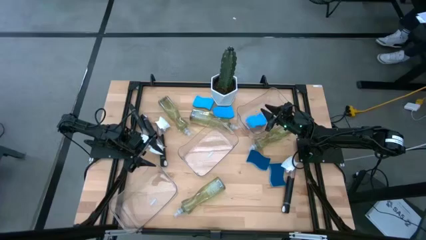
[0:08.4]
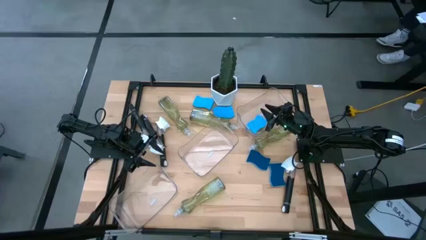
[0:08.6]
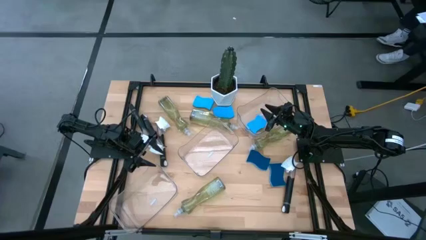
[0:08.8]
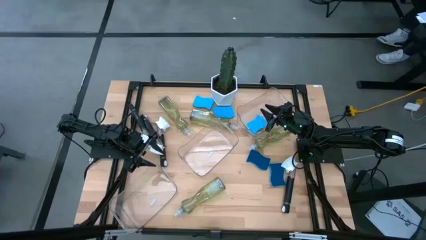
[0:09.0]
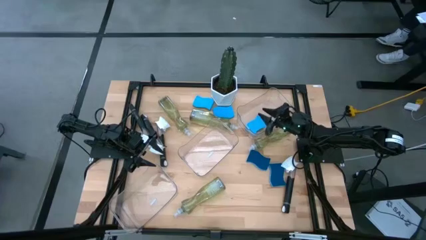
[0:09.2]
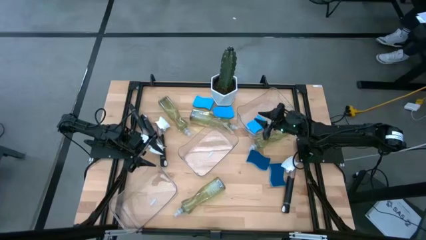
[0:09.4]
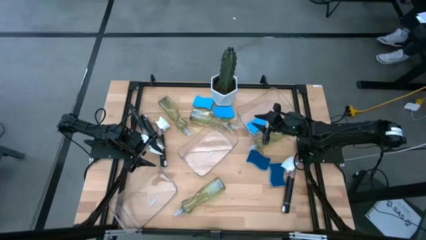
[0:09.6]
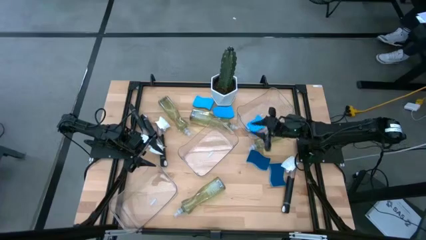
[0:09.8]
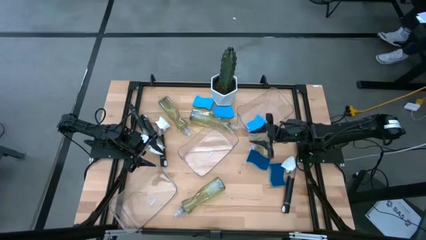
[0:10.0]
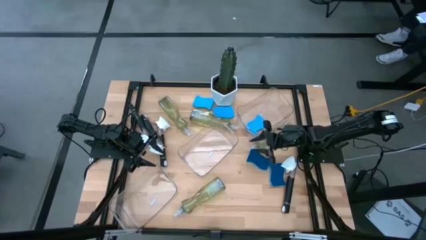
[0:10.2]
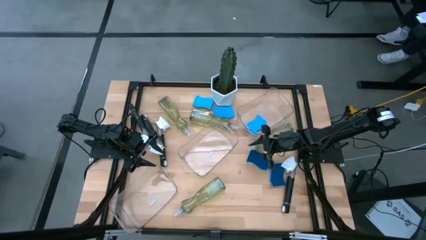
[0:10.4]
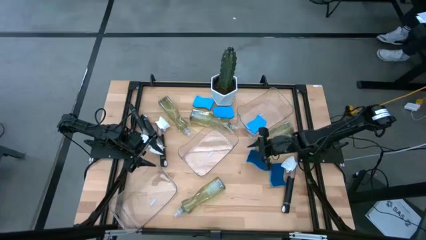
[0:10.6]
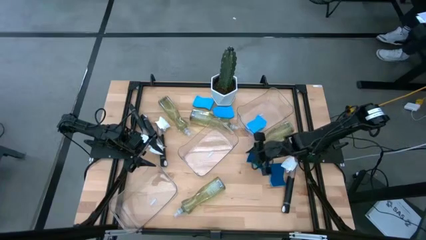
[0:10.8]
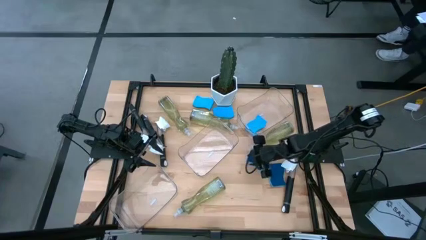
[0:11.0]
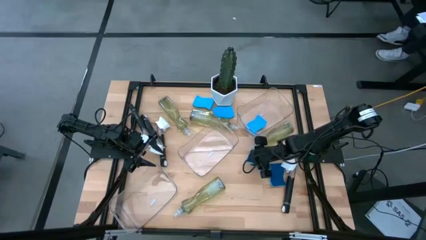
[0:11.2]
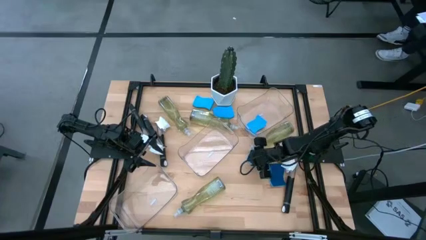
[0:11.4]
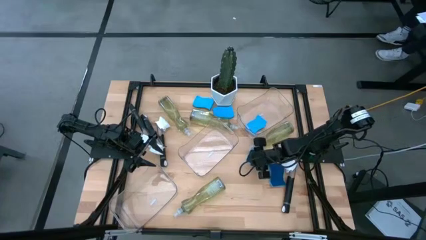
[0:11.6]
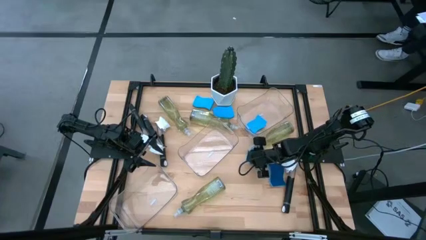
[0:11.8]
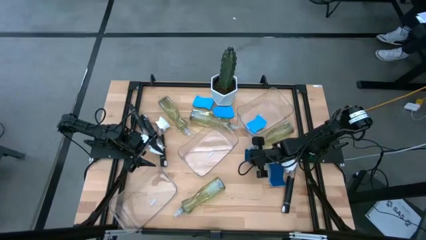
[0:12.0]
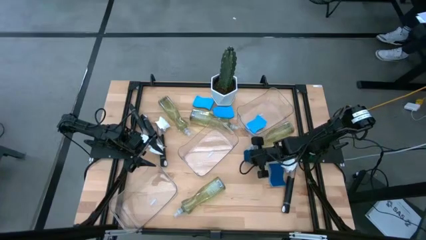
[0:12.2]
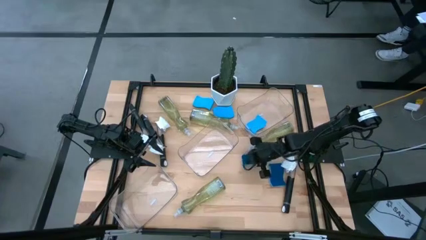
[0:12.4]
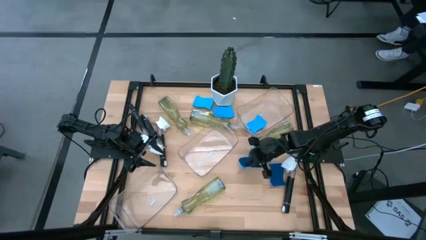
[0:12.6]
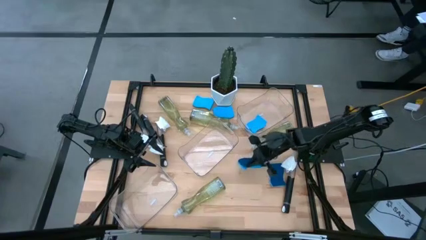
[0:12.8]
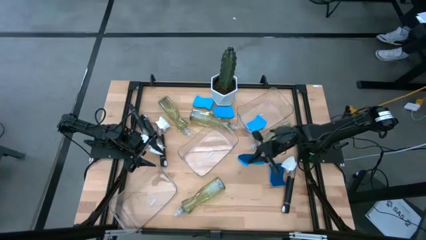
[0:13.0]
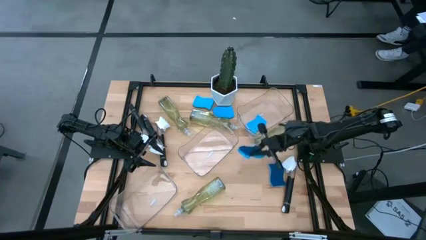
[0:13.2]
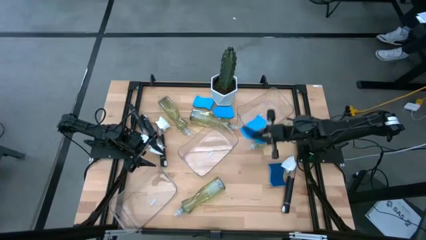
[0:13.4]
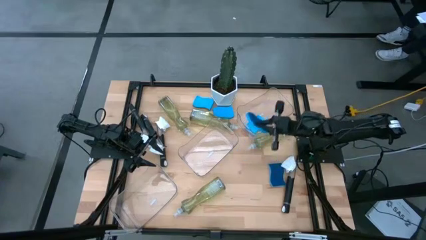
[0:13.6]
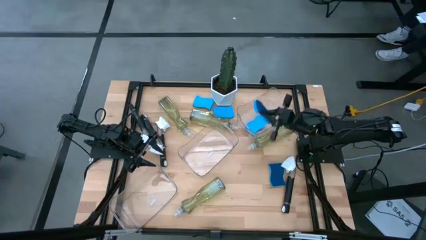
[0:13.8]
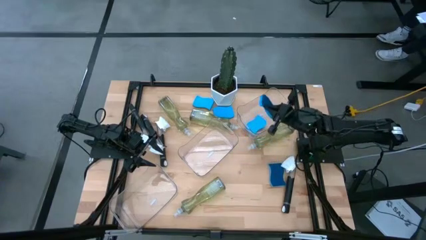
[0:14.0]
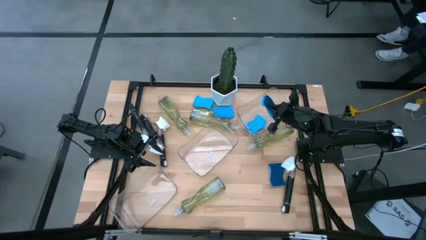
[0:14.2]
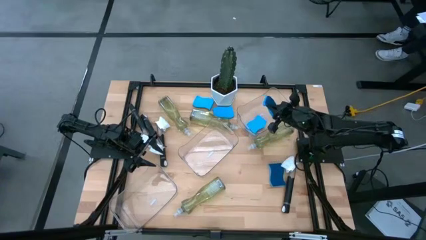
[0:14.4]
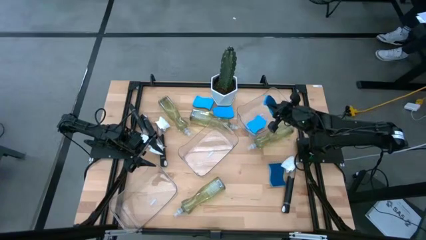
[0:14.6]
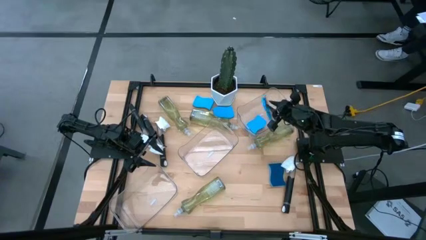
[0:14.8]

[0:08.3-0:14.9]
Task: Pick & Place Kitchen Sink Supplies
Put the blue sponge into the top transparent bin

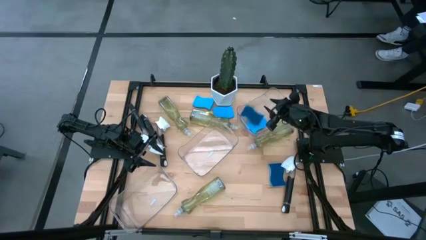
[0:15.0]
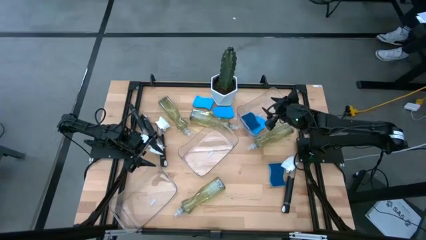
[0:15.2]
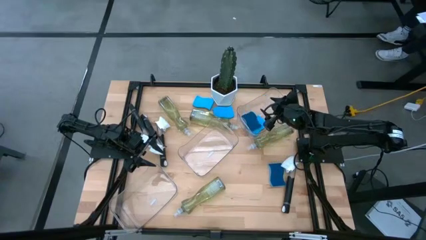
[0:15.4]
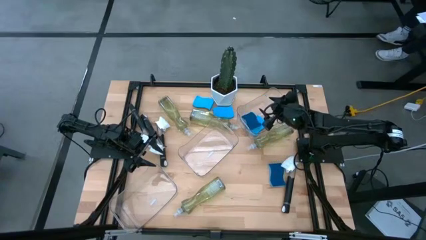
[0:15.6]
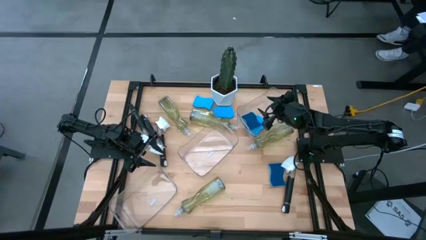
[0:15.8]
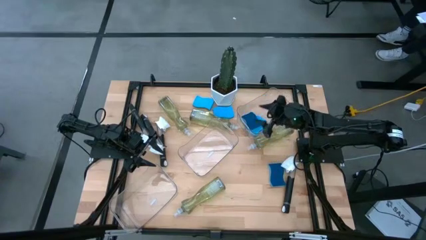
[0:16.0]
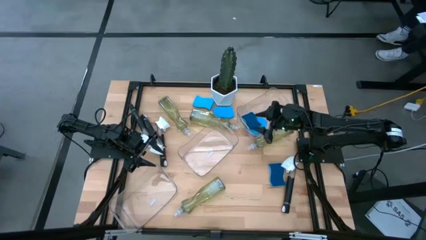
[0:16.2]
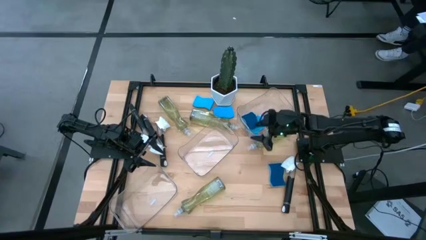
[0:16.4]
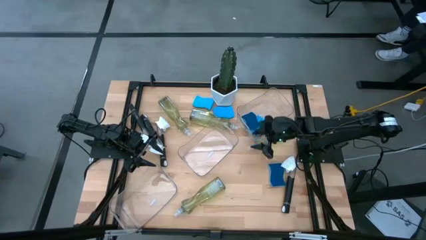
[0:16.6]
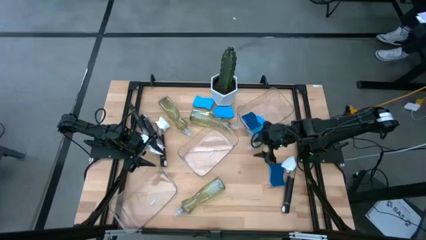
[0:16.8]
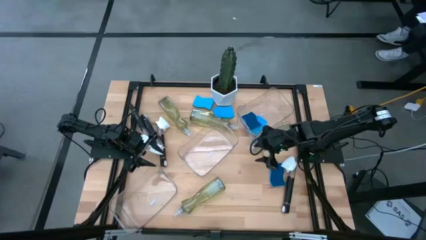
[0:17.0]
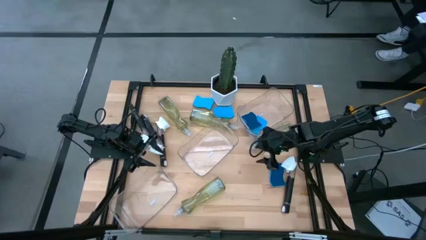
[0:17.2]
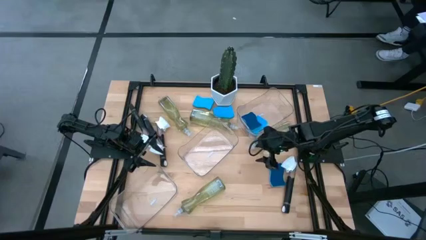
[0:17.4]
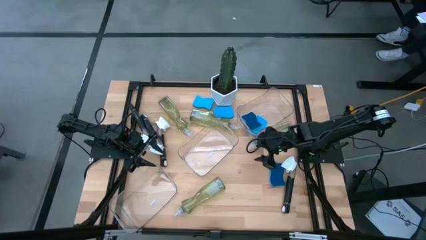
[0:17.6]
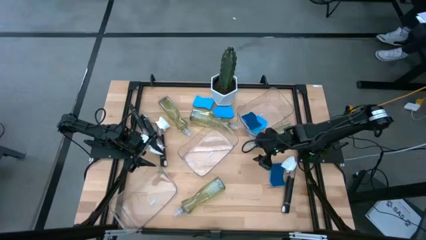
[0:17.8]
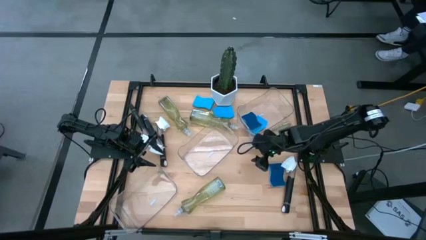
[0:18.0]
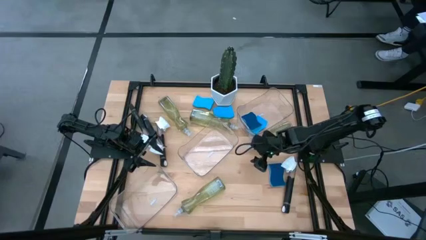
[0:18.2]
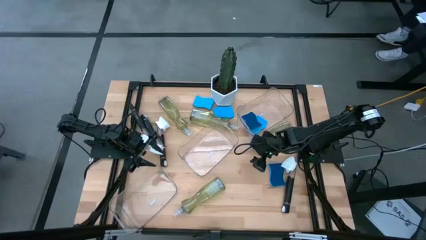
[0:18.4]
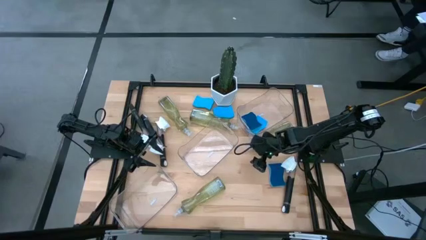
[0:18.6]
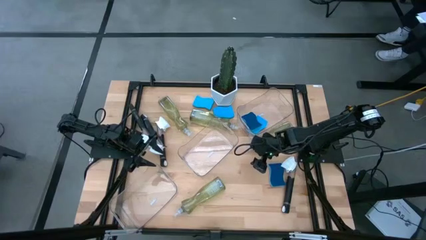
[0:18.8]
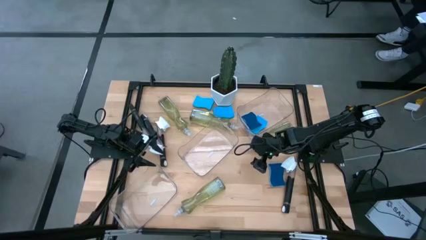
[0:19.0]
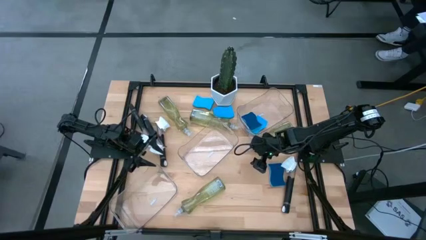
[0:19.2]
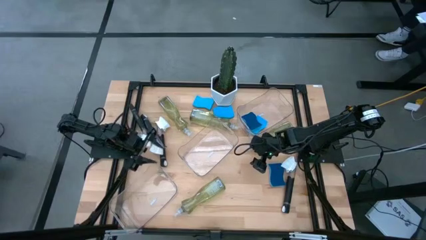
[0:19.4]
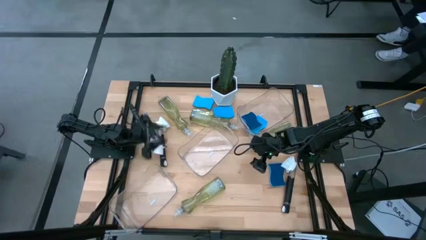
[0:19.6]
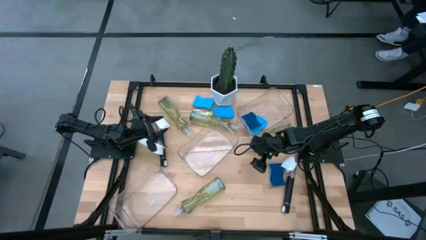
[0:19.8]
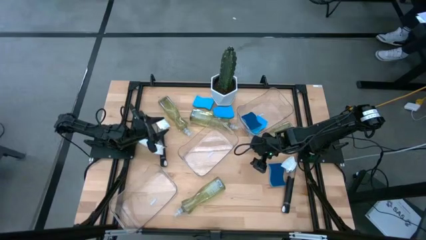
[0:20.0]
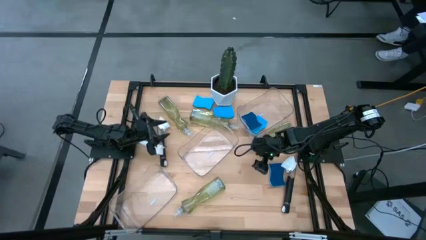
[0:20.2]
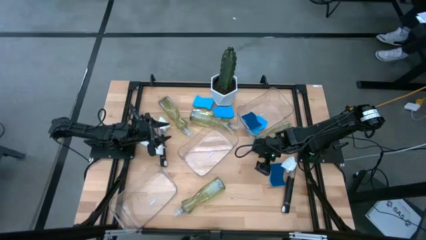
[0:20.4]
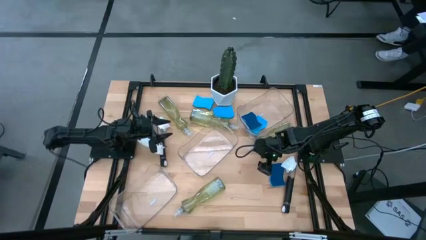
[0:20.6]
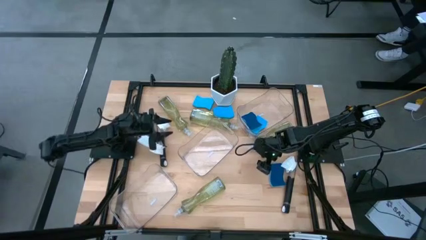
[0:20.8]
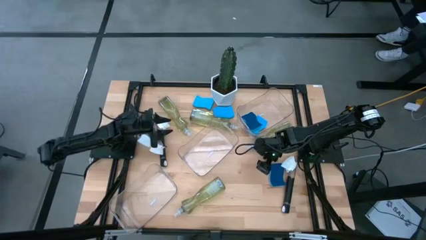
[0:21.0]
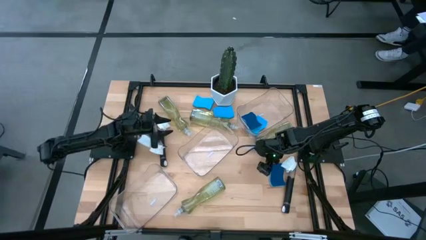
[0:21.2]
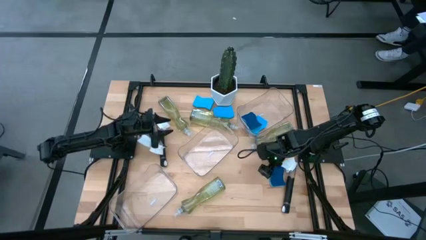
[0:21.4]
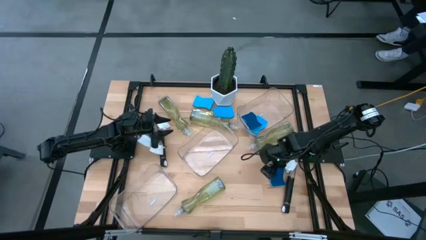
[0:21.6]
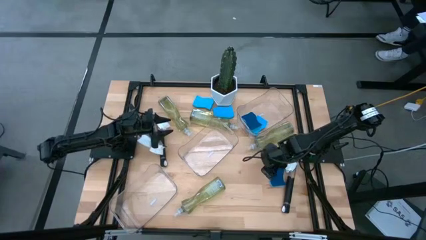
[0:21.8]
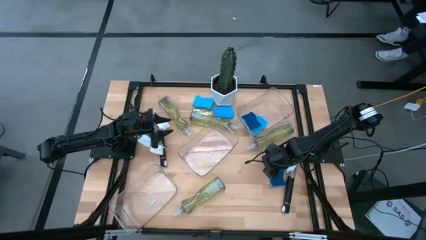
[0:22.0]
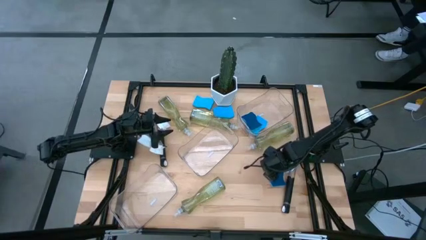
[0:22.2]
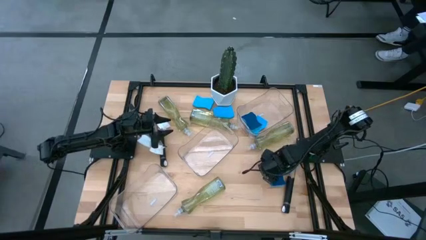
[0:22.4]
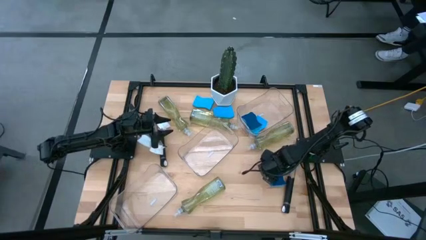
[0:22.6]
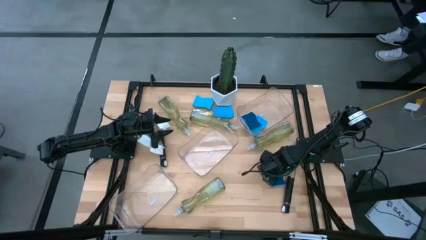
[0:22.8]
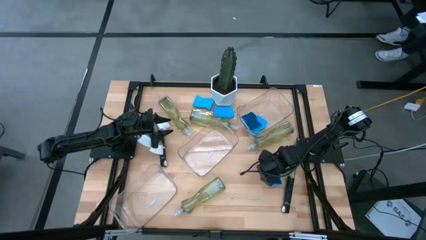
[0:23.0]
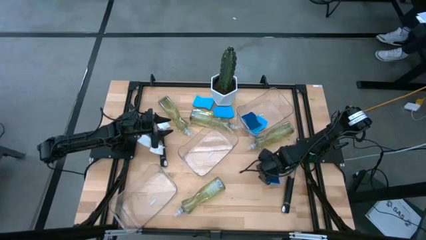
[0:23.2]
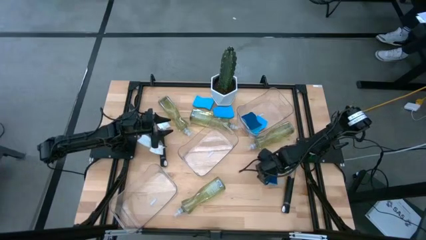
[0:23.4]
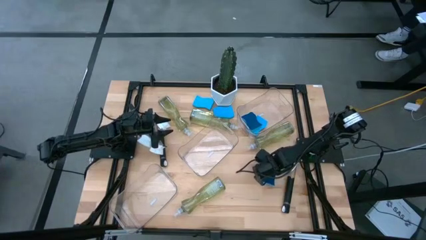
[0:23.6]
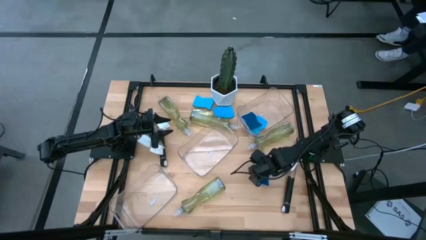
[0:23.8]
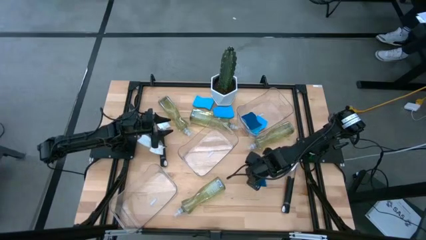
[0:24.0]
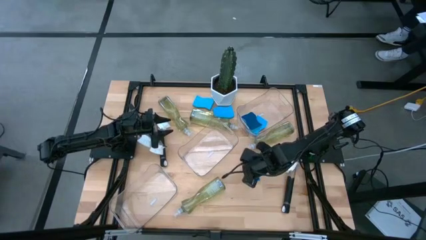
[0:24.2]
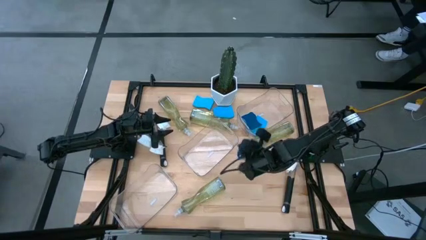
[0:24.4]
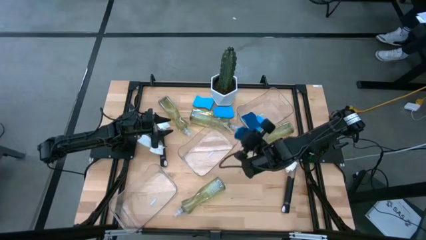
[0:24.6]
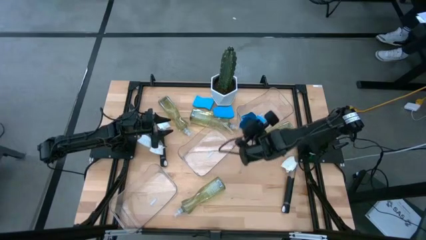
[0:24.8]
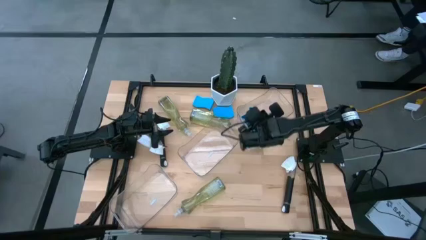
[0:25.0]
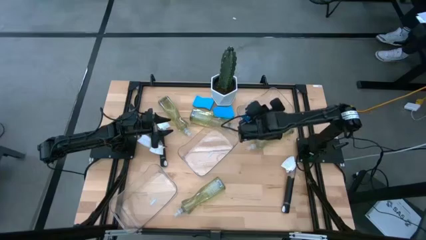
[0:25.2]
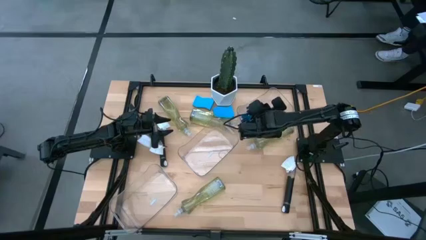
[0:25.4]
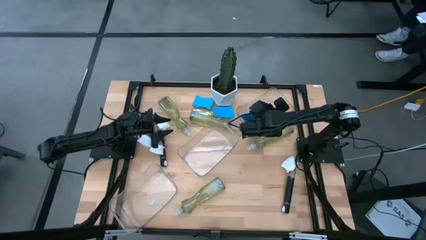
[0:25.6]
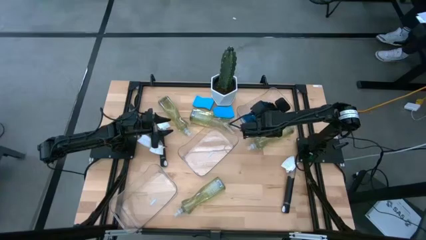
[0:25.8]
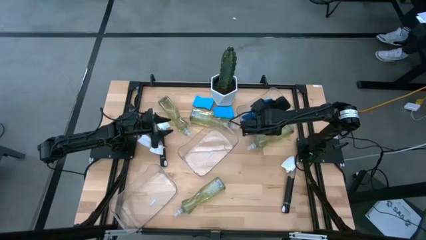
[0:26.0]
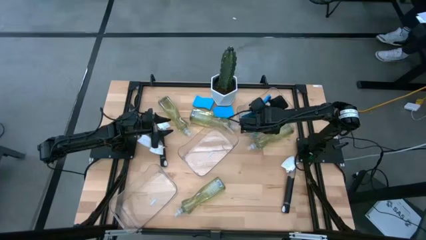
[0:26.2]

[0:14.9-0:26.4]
Put the blue sponge into the top transparent bin
